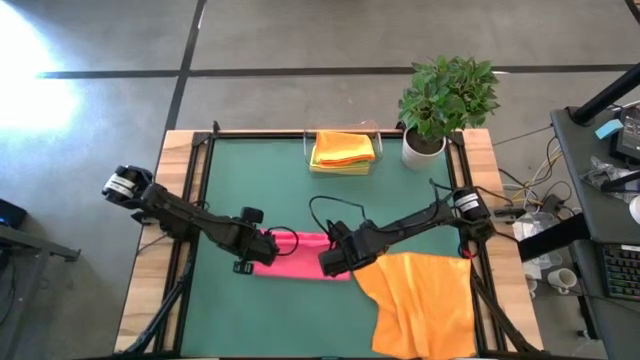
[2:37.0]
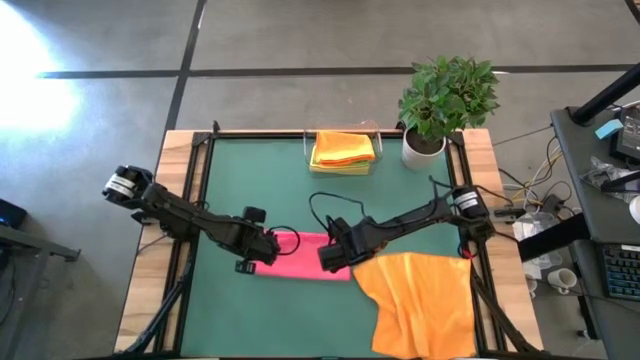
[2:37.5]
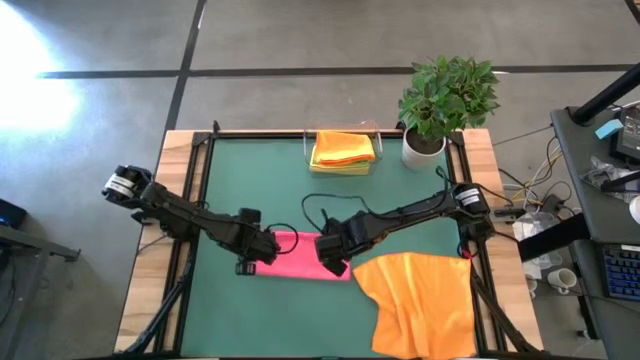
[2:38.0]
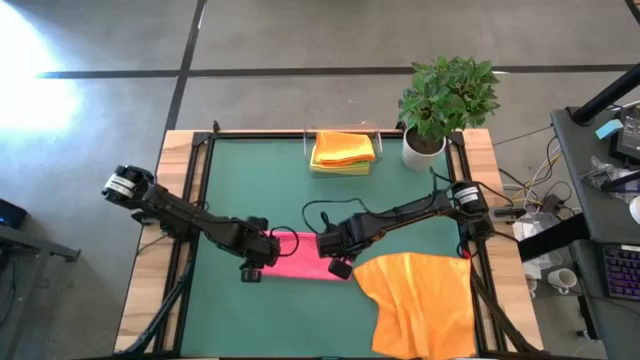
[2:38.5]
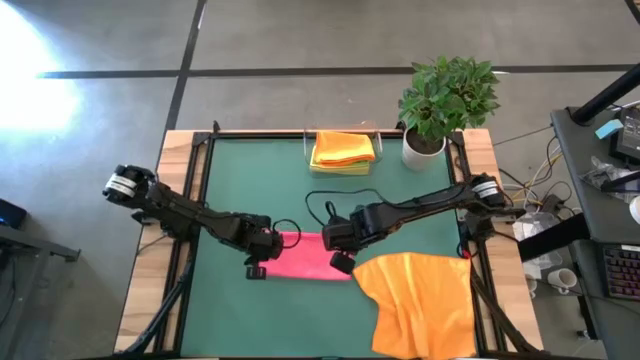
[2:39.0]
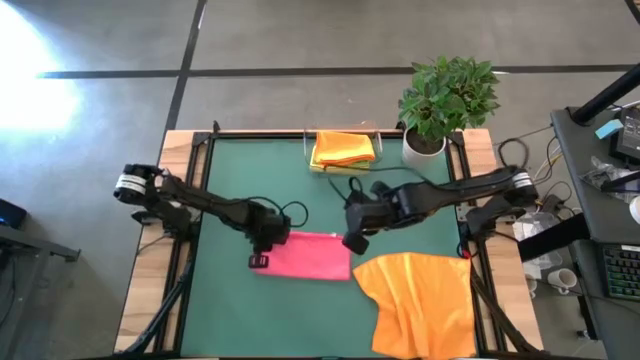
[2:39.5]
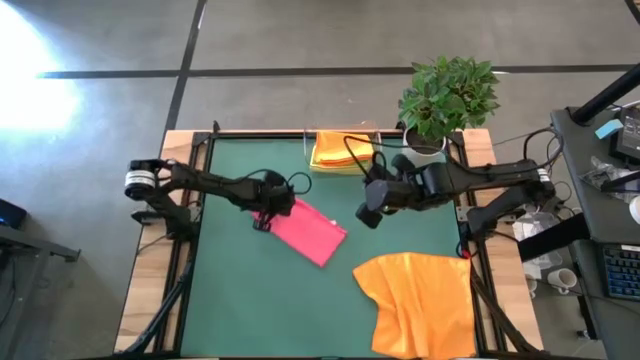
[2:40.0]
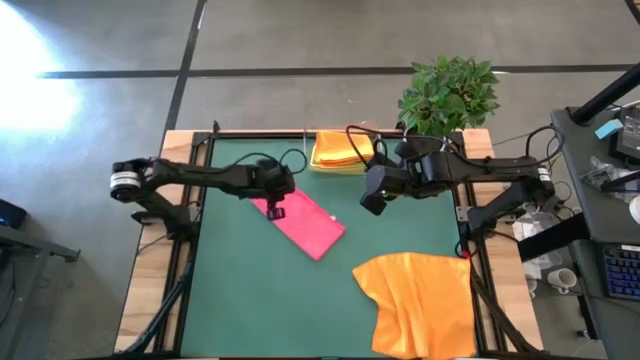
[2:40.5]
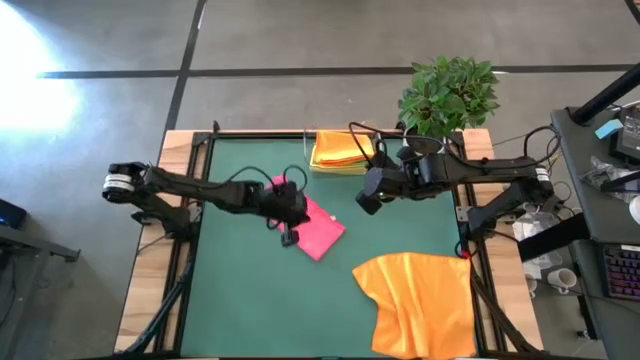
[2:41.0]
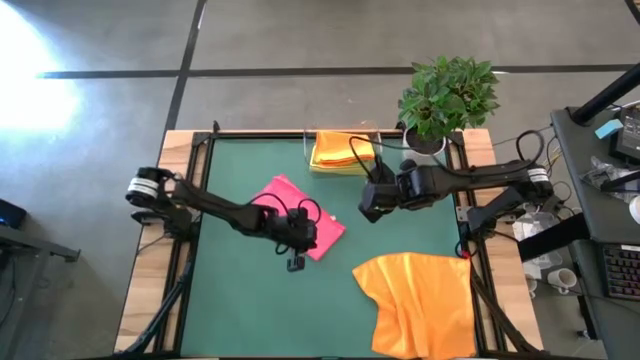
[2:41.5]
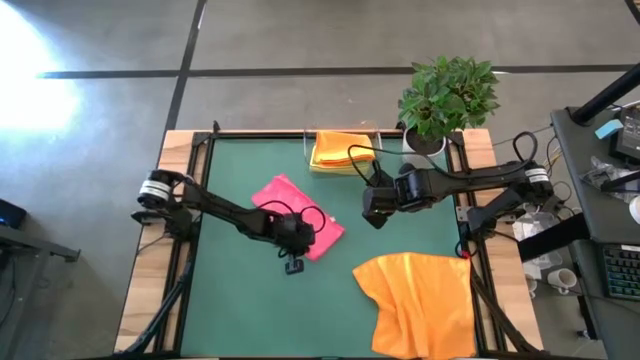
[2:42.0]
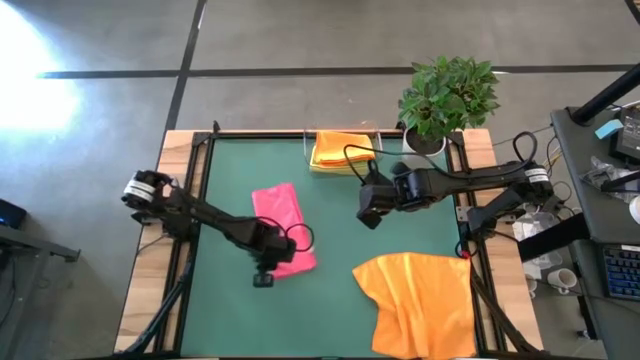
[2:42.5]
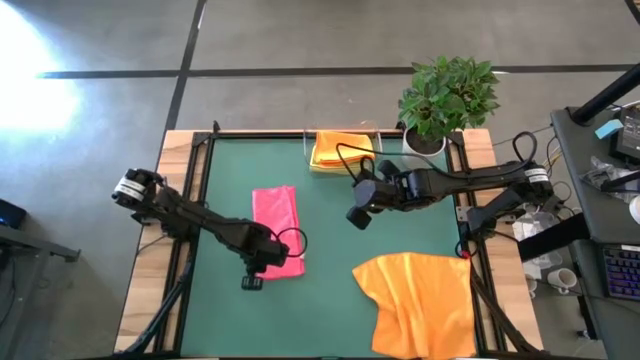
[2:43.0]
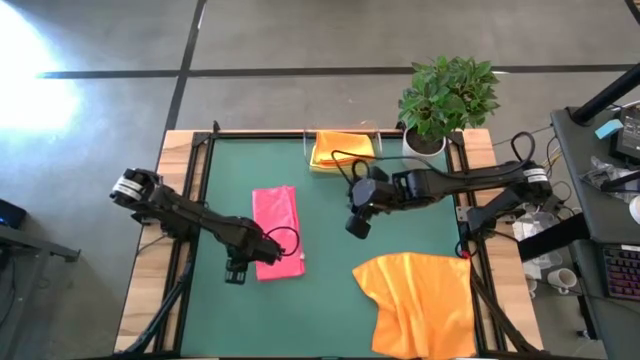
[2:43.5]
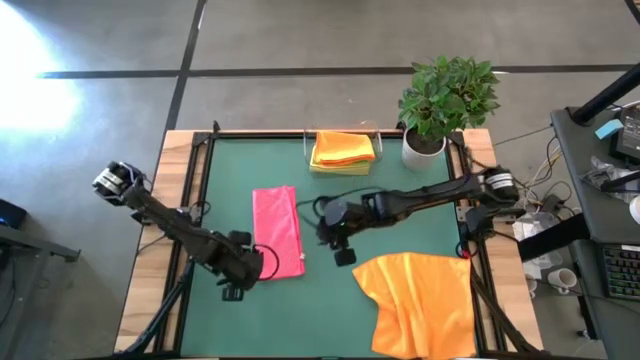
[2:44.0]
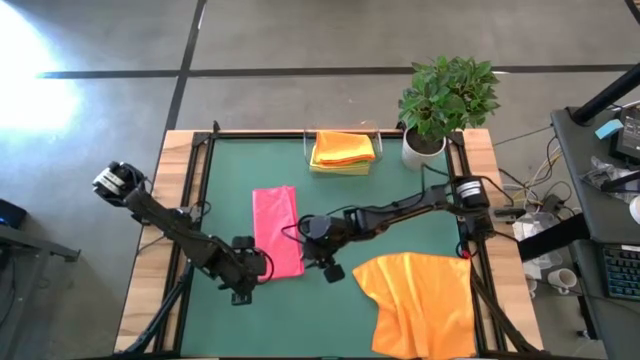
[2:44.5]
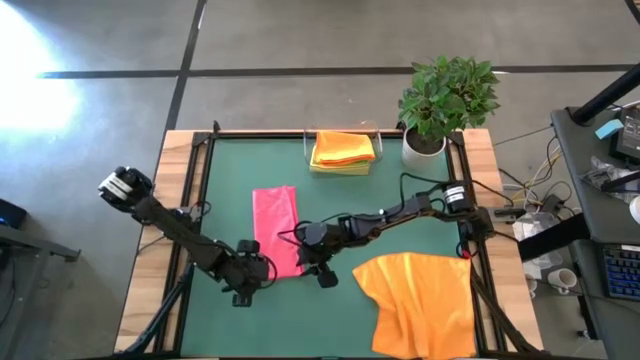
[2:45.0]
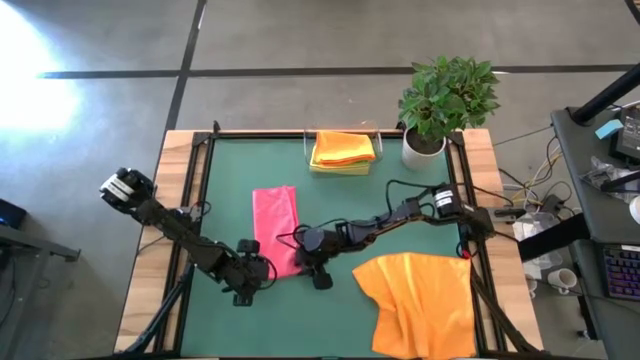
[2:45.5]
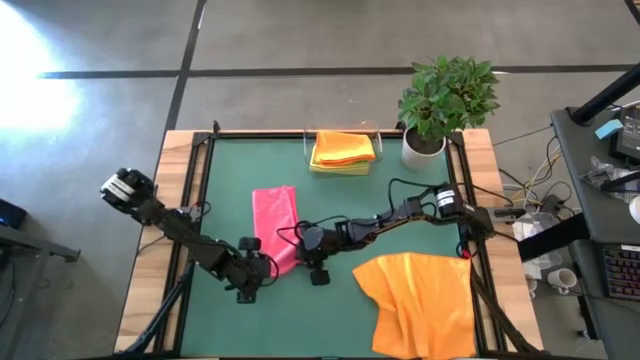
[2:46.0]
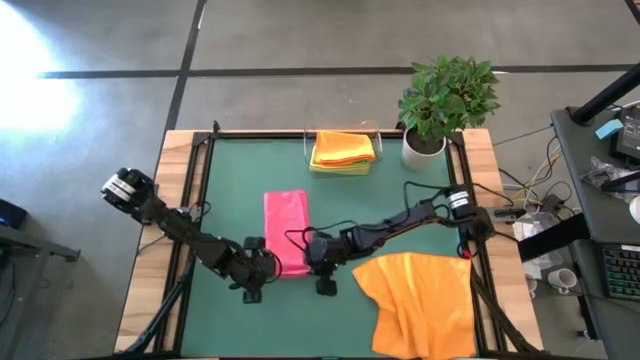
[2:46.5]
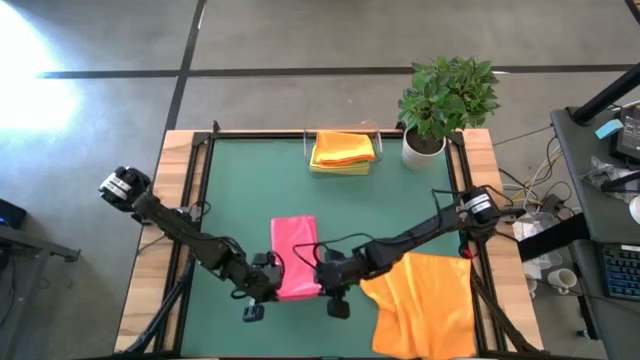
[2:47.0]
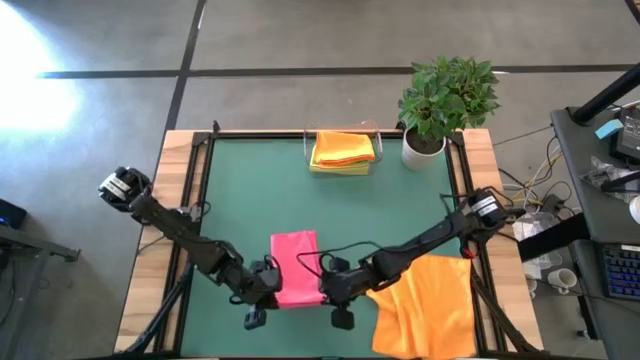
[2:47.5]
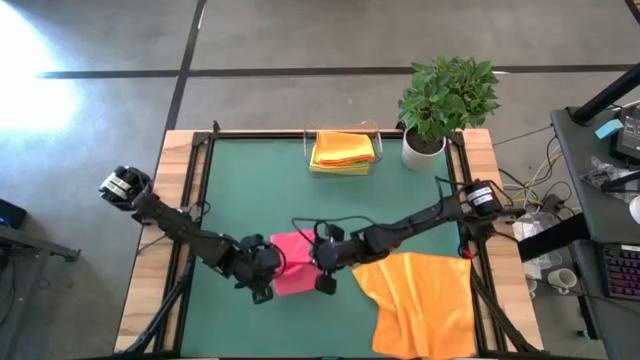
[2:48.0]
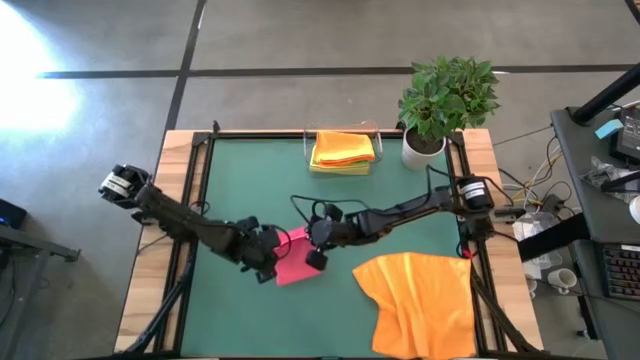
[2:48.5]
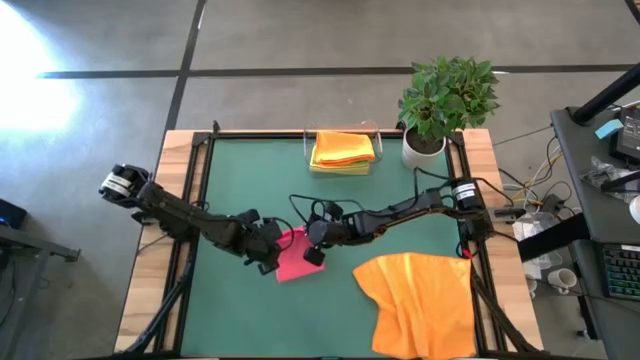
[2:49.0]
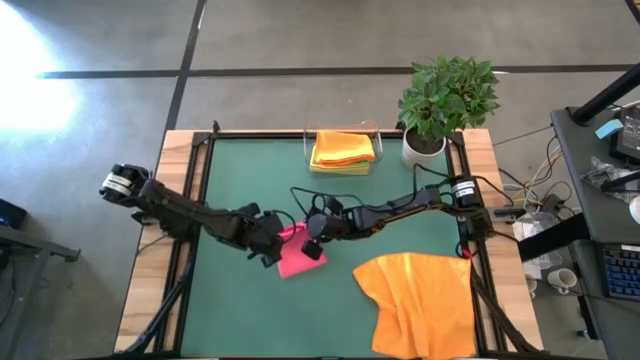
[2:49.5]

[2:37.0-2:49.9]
Task: Fold microfiber towels
Fold the pink towel

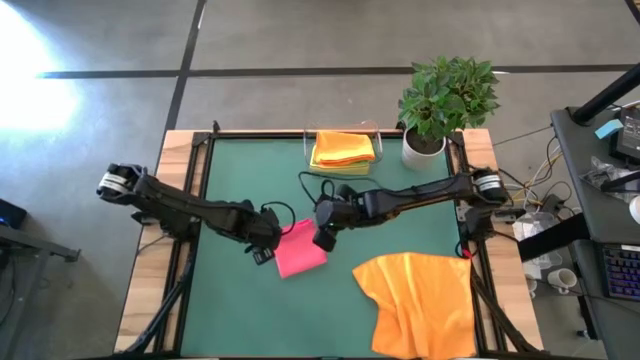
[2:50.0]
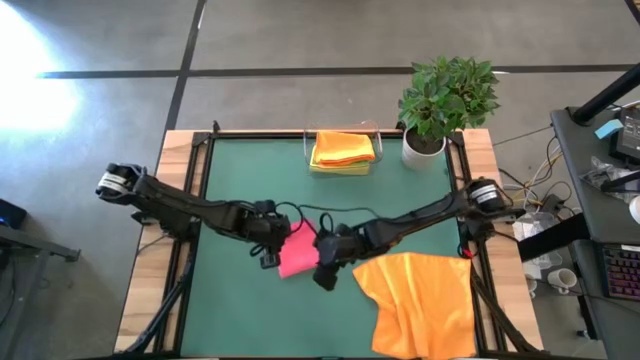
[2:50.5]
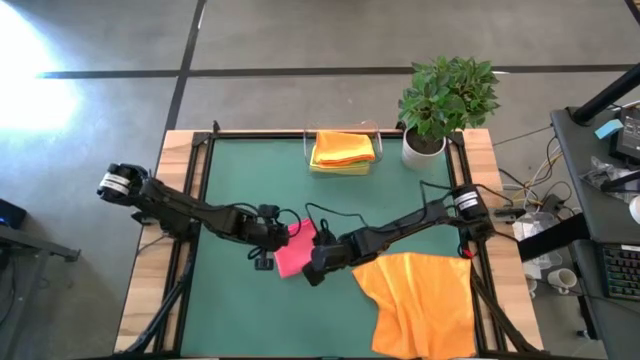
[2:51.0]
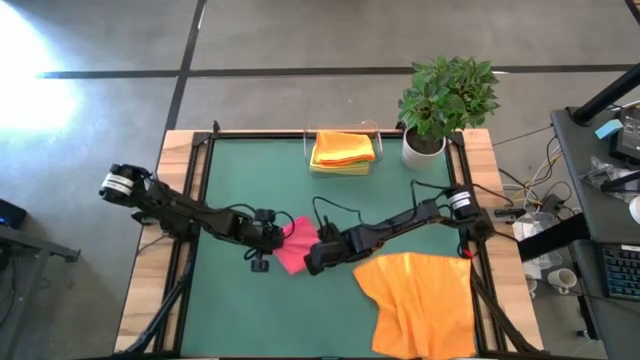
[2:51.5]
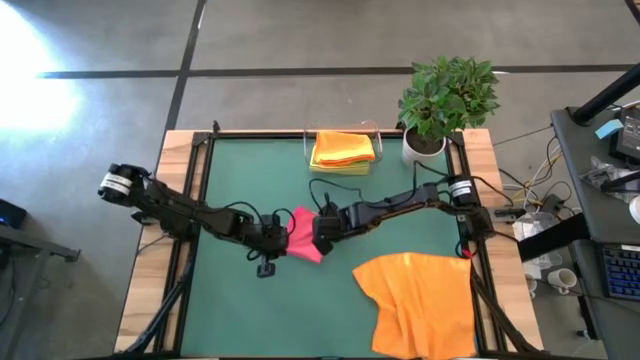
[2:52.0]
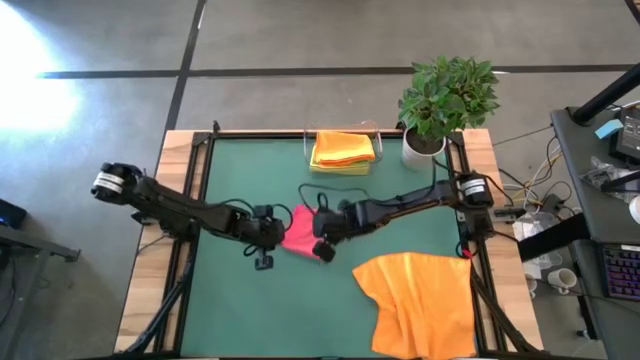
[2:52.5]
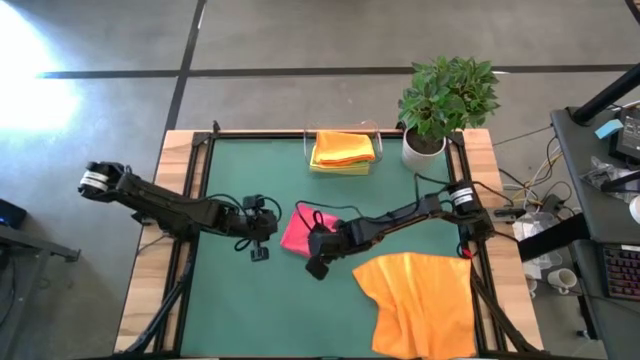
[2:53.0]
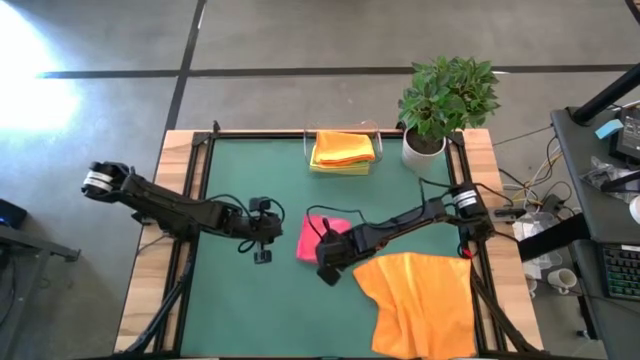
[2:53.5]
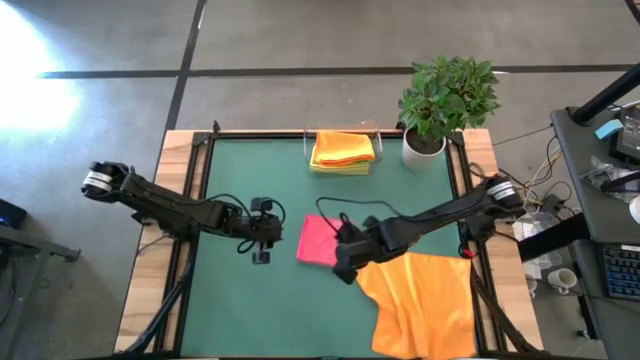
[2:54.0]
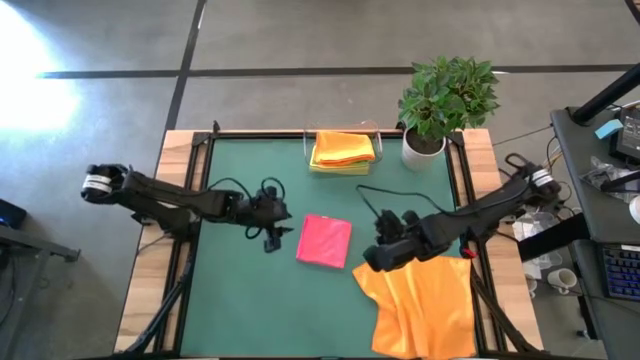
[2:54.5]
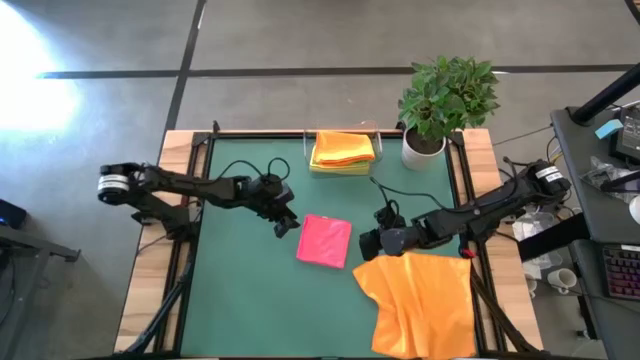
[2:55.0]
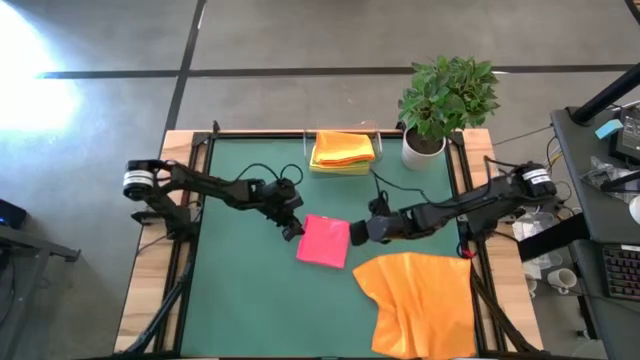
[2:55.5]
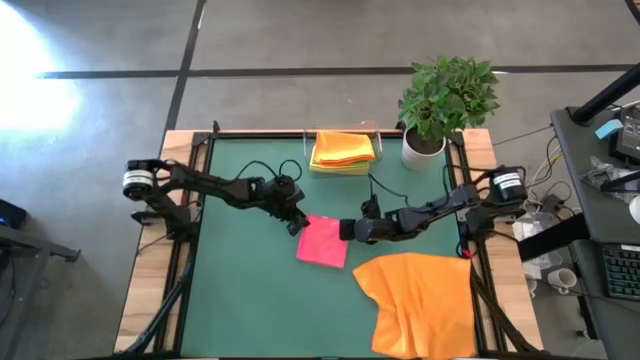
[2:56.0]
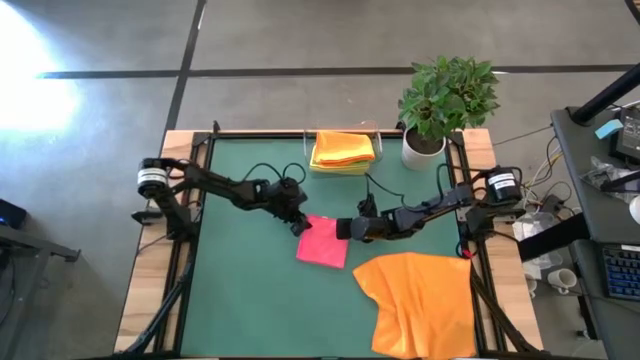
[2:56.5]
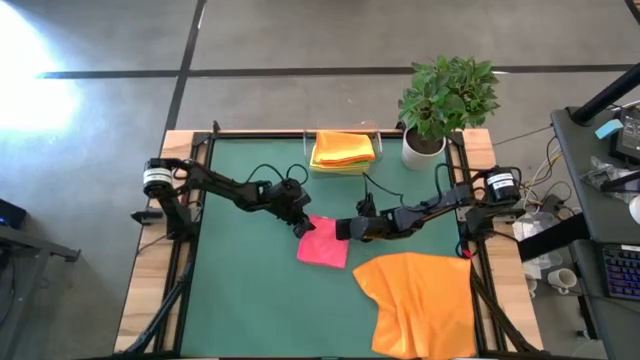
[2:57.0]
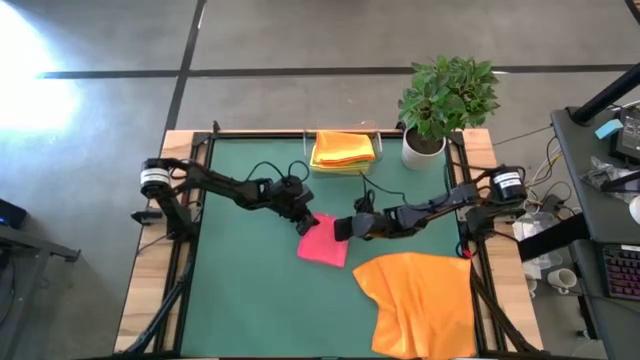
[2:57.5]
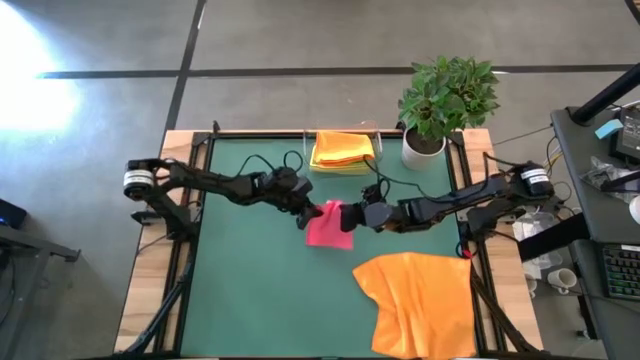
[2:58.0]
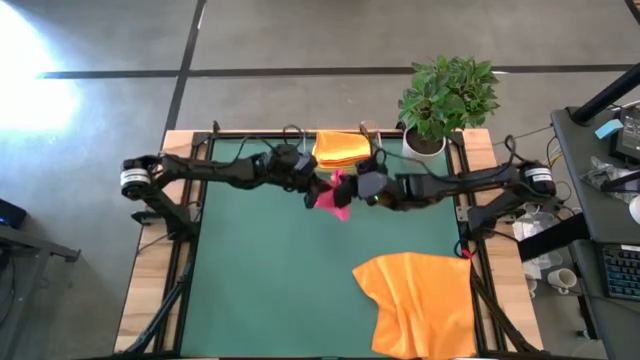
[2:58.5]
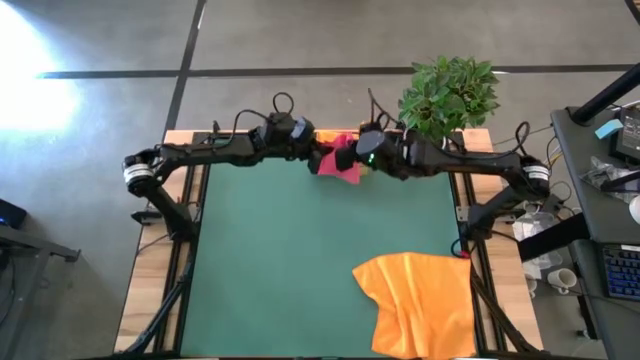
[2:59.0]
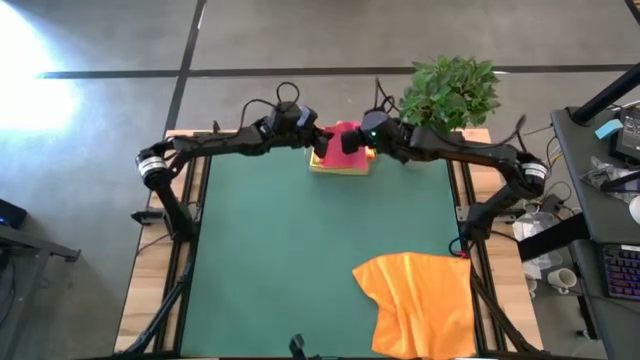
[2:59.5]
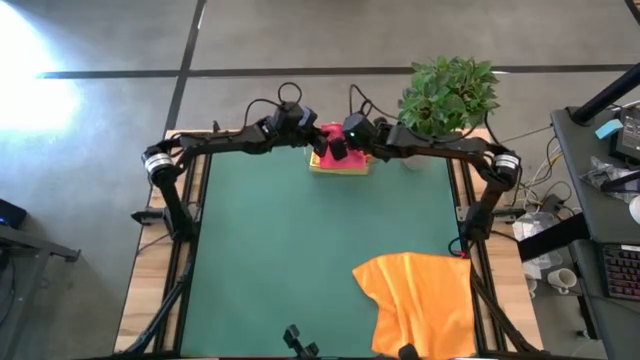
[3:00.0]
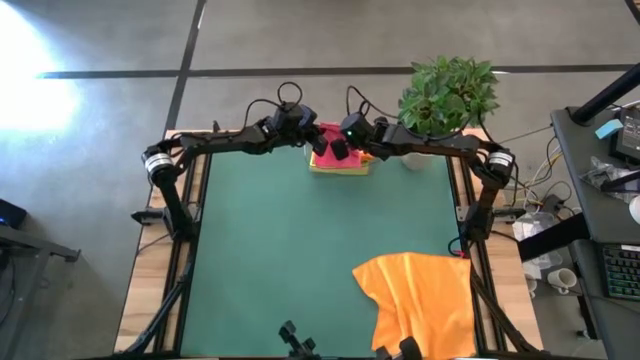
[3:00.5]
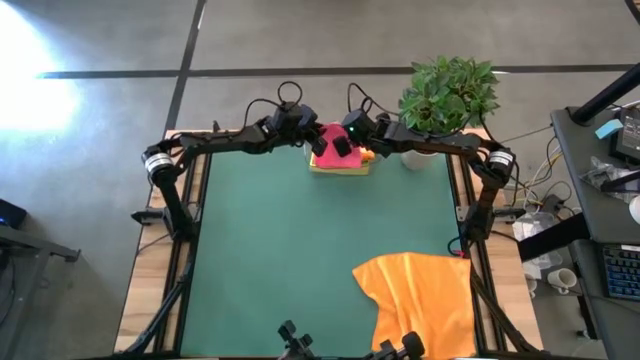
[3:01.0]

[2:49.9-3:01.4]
Put the folded pink towel into the transparent bin
